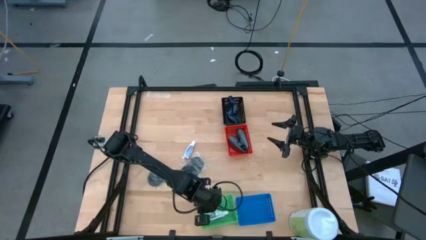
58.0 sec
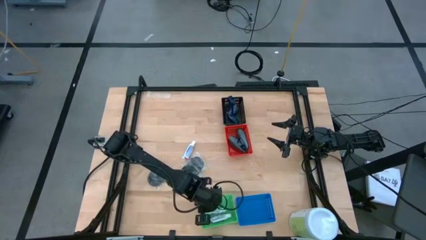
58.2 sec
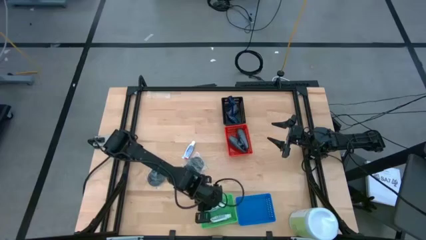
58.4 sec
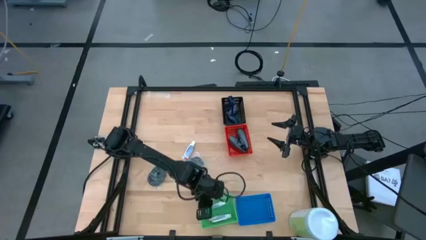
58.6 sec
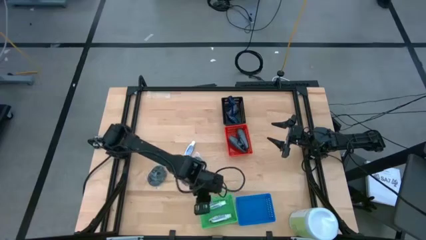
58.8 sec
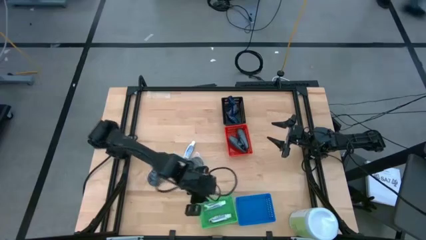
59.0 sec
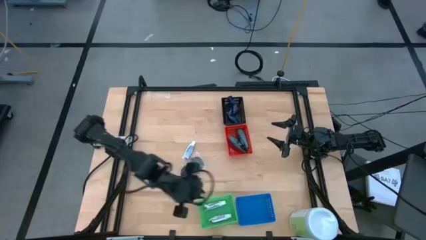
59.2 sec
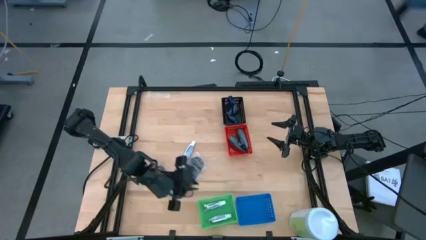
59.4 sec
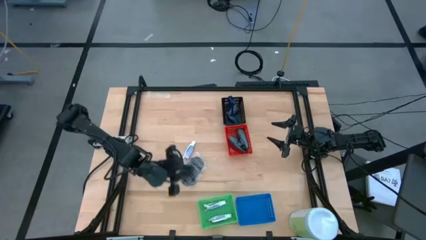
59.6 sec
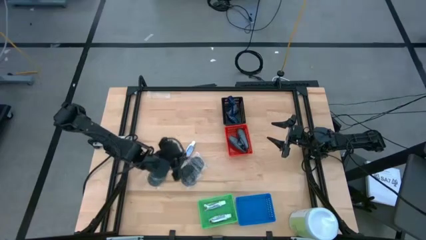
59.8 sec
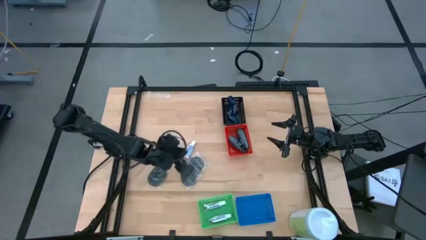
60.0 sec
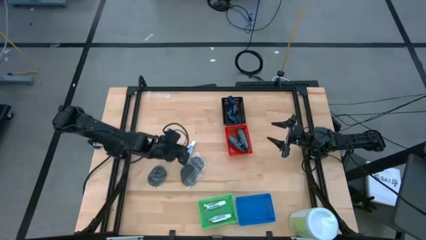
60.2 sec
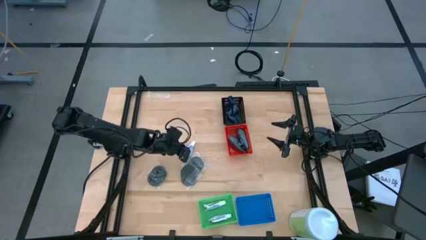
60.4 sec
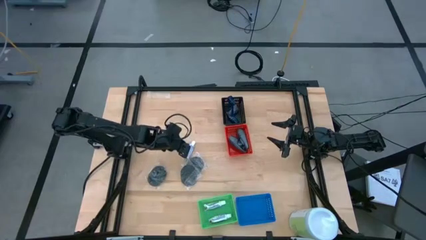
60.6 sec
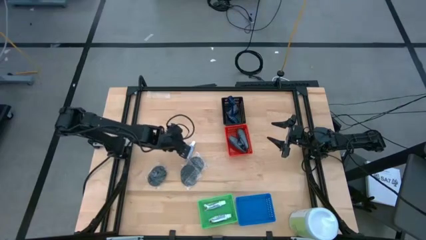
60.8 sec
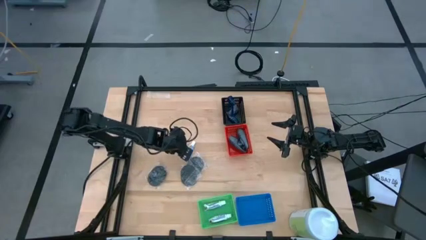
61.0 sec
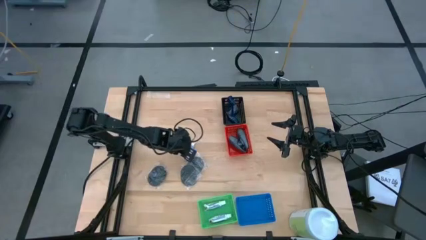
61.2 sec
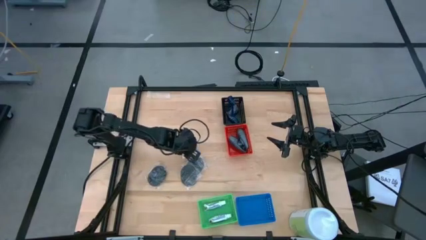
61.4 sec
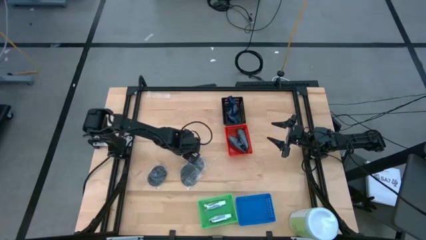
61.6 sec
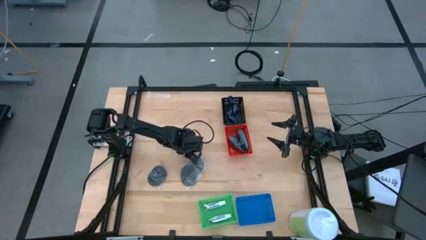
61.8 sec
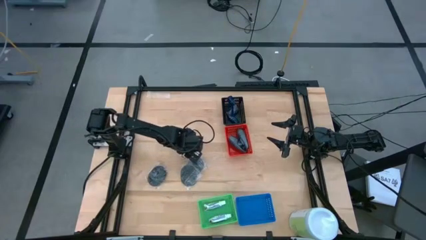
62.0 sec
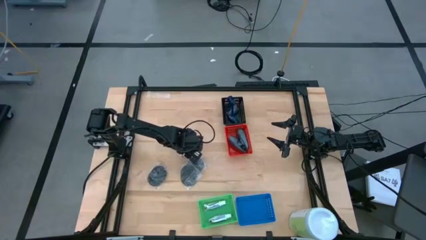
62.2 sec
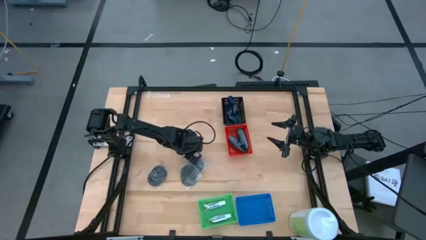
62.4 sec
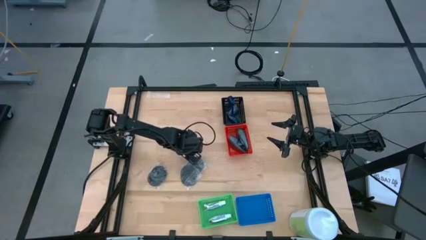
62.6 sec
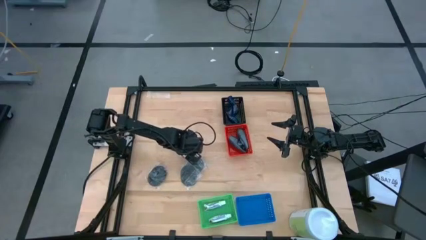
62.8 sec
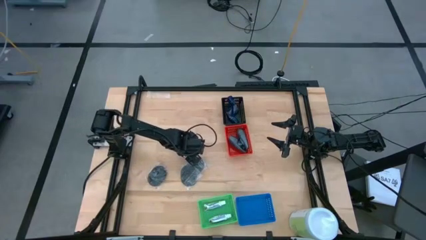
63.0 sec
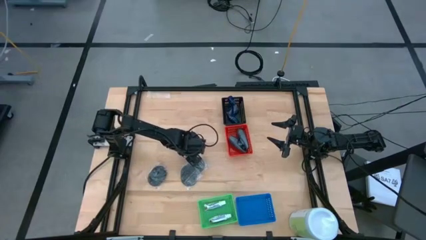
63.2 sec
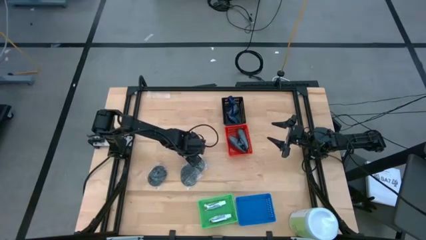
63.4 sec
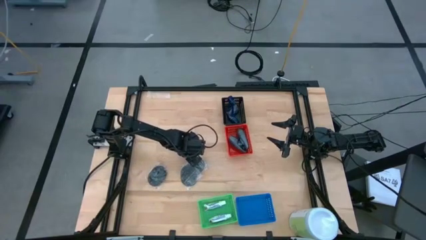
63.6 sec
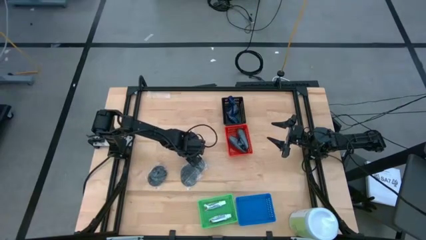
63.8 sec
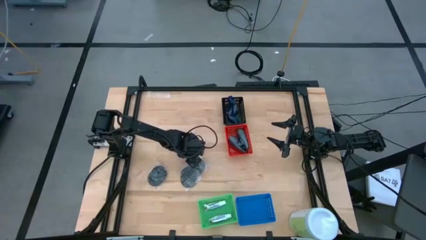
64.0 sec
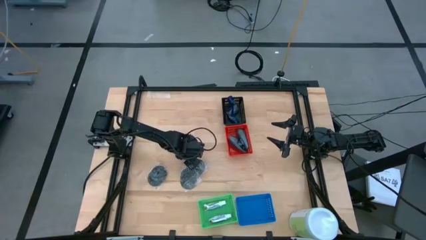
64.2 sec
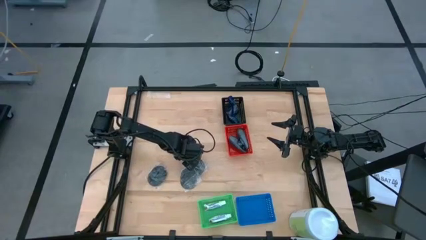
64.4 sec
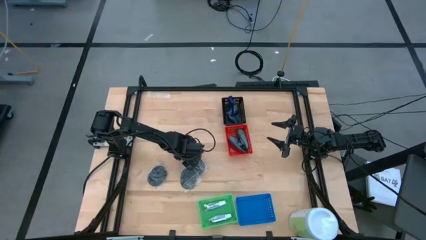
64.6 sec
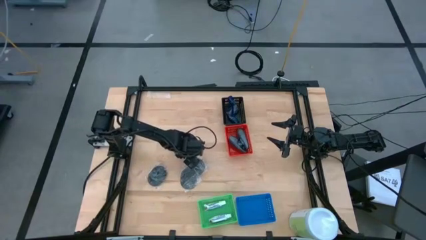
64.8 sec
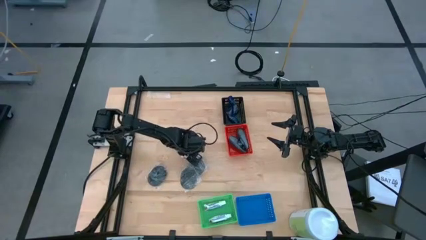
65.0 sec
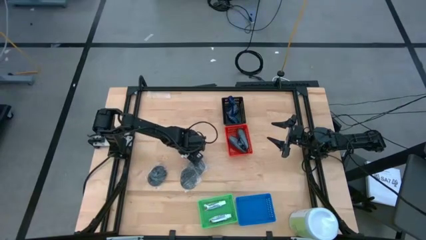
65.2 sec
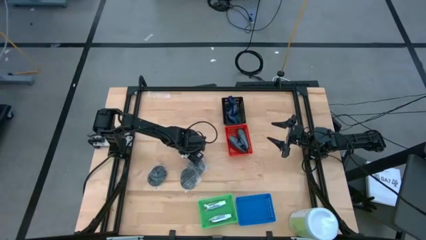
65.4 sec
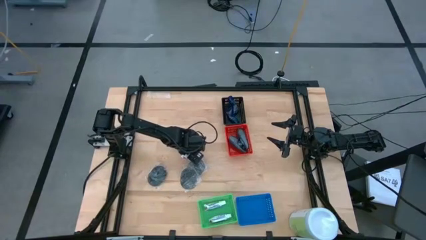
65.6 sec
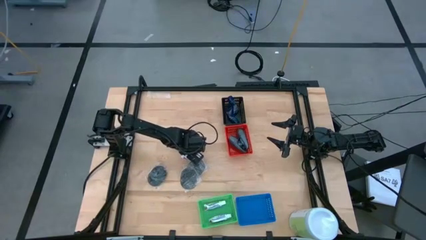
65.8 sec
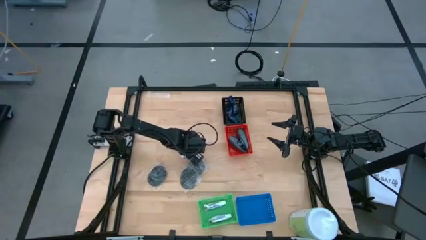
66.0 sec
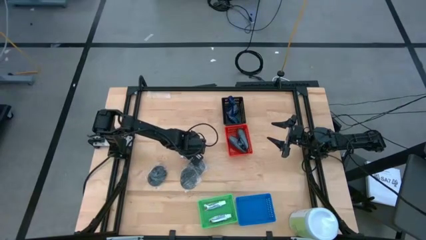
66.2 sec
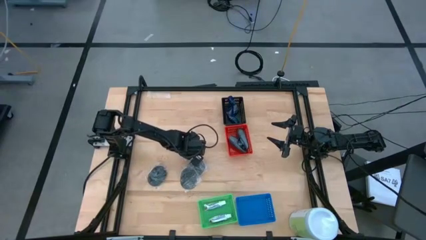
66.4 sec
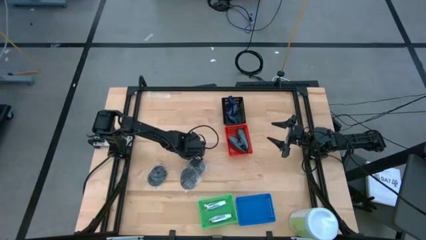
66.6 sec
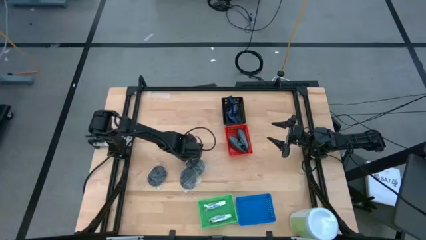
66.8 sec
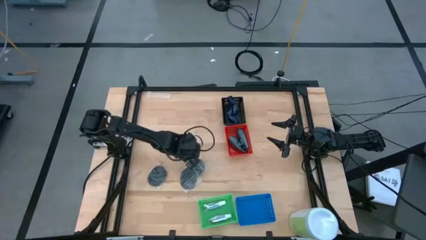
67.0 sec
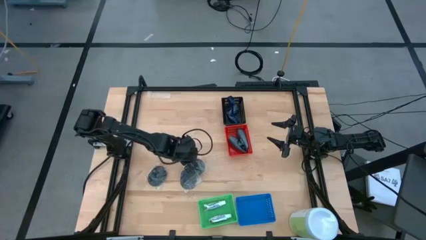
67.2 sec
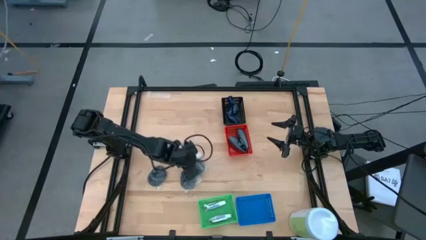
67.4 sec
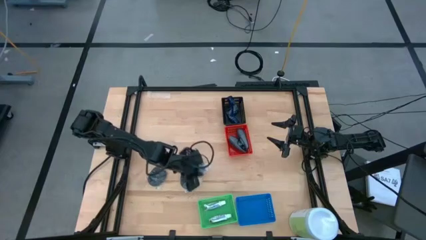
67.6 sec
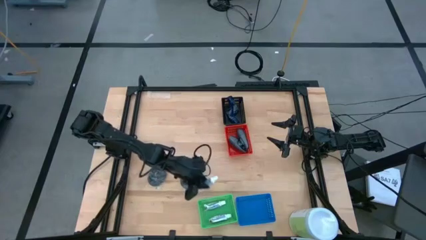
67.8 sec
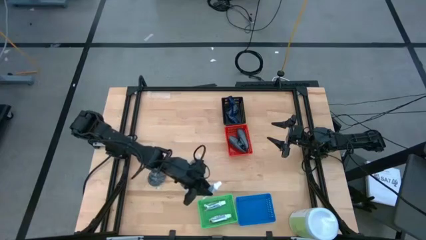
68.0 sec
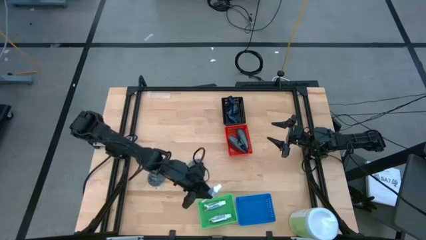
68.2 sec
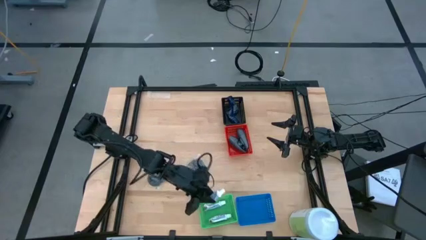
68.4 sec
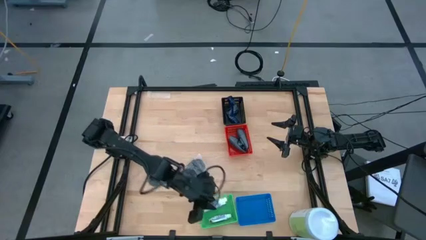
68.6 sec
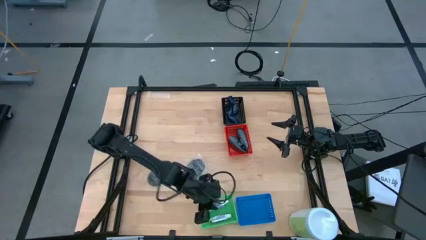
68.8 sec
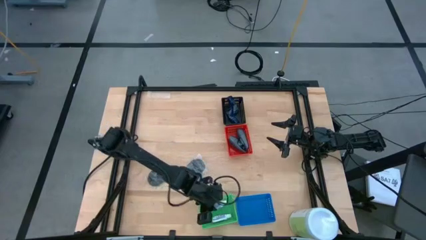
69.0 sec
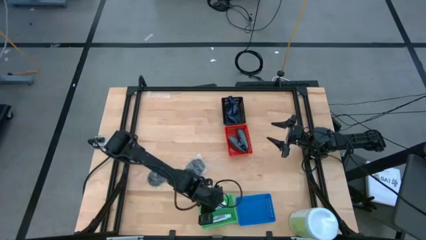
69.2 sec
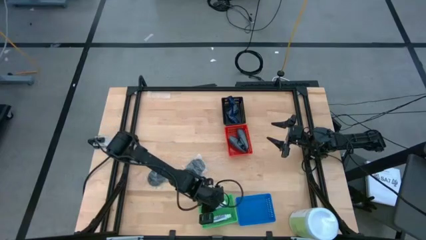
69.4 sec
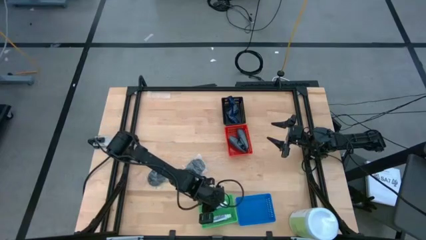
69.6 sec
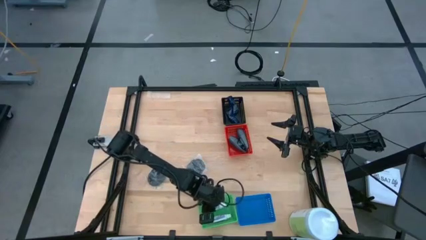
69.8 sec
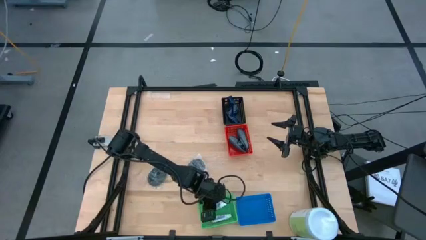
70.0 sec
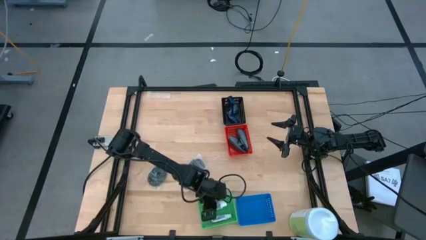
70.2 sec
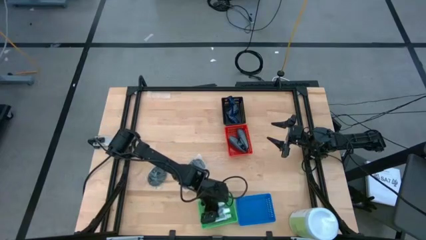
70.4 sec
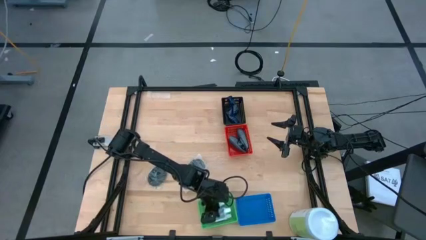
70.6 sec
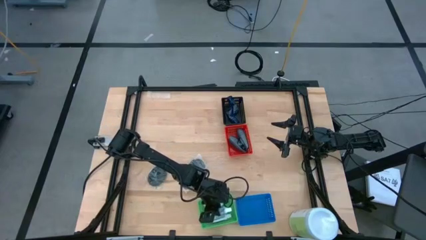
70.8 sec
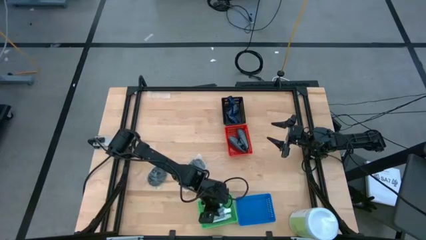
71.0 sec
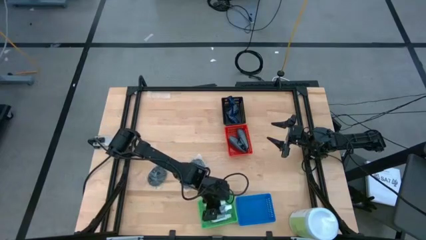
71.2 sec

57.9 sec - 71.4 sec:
Task: Pick & Place Travel size toiletries
Put the white toothpaste into the green bin

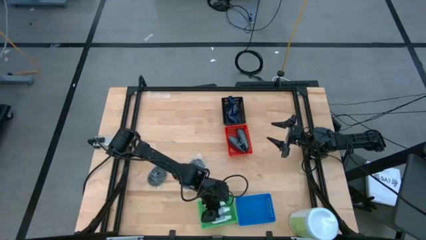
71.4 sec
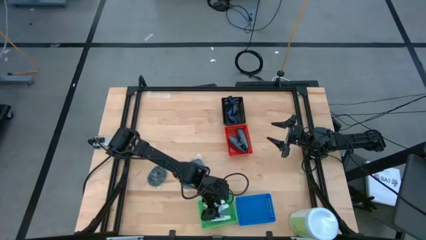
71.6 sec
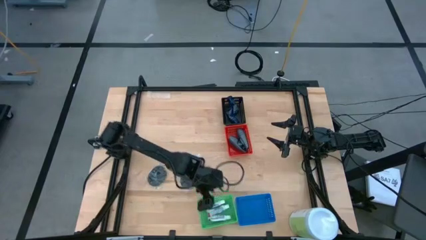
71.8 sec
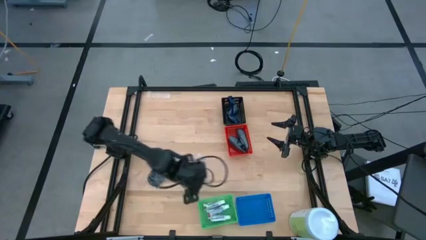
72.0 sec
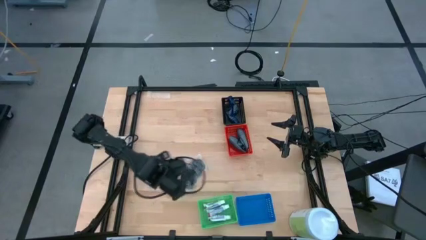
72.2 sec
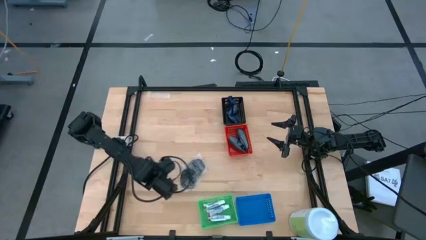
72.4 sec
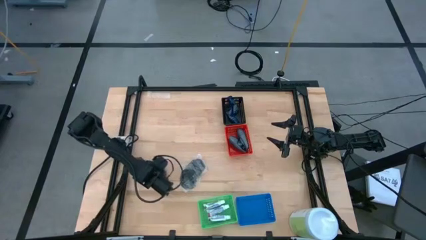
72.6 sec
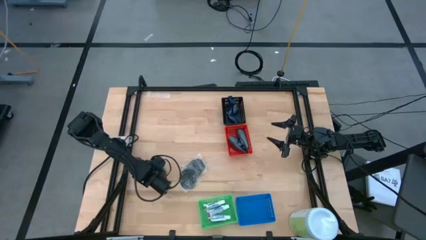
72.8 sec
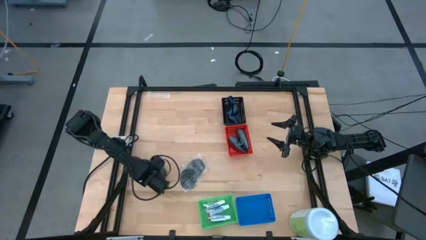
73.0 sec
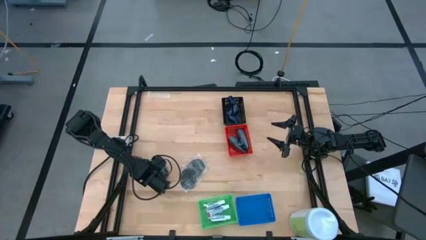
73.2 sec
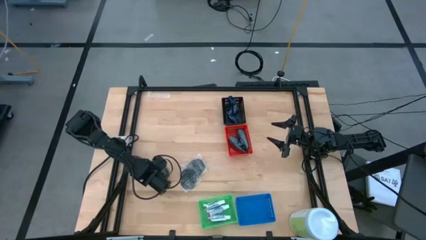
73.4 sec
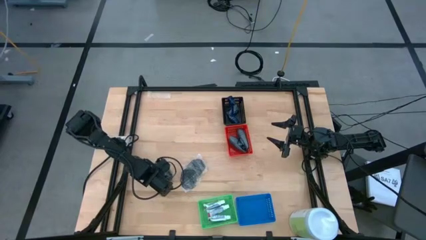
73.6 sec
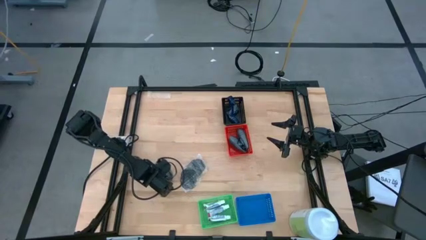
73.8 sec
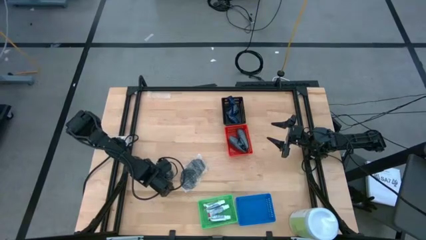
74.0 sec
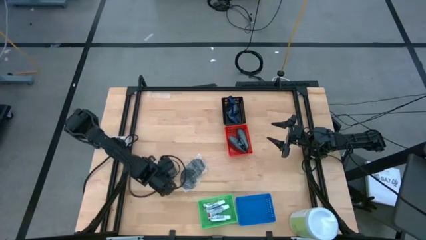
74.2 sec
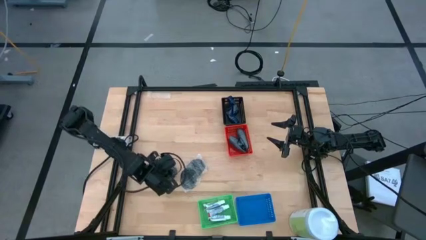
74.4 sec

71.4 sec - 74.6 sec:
Put the left black hairbrush into the blue bin
